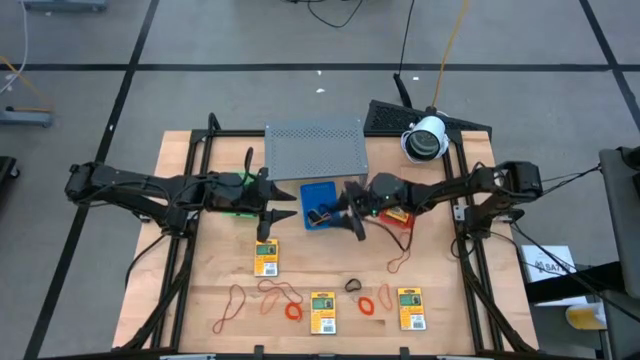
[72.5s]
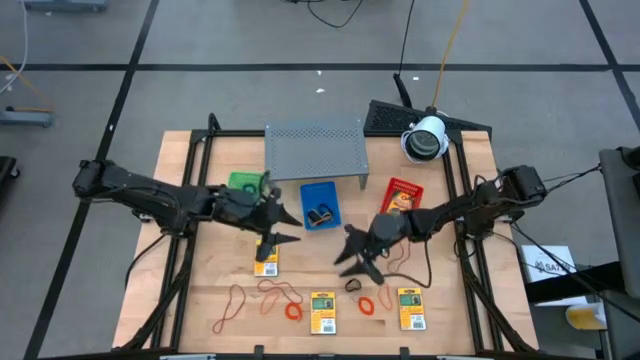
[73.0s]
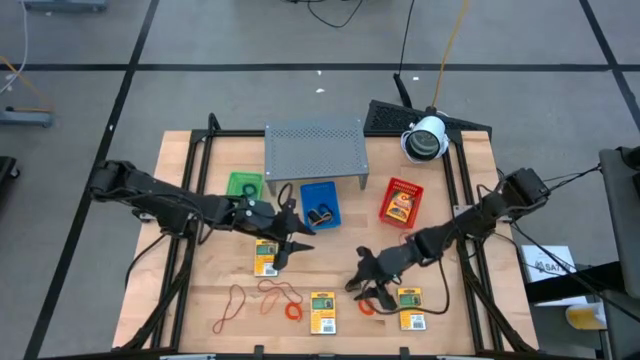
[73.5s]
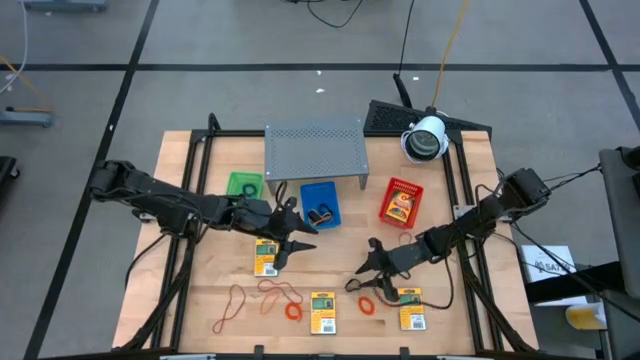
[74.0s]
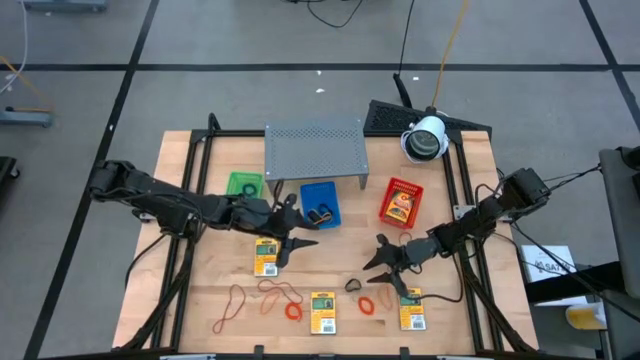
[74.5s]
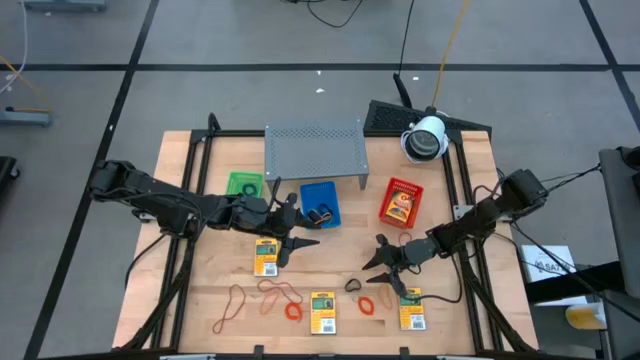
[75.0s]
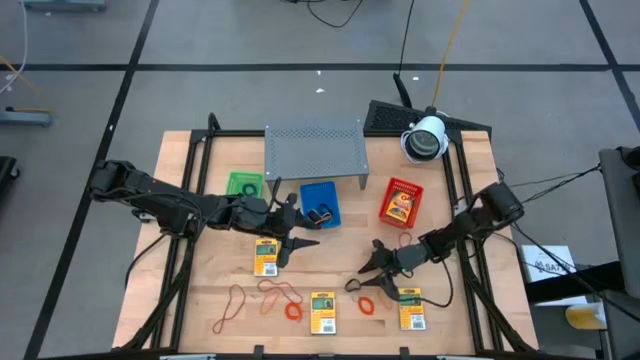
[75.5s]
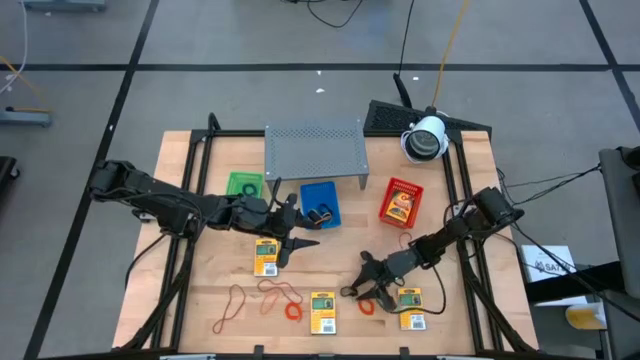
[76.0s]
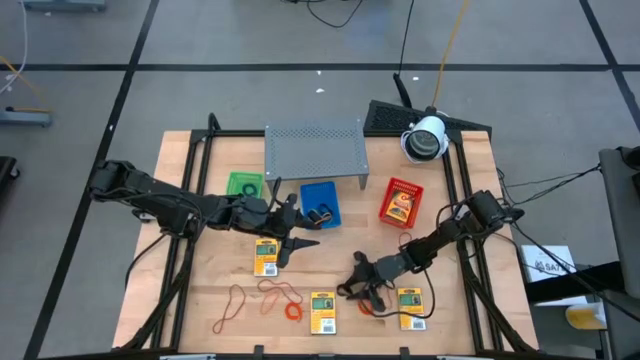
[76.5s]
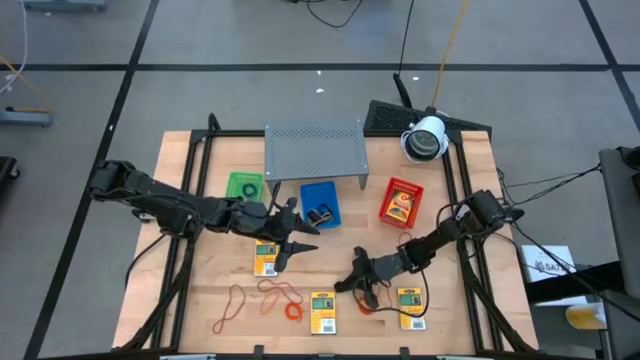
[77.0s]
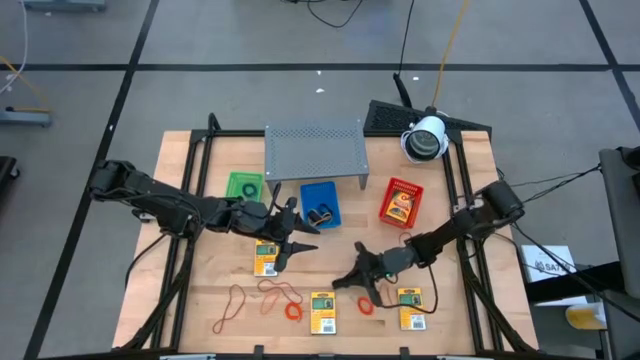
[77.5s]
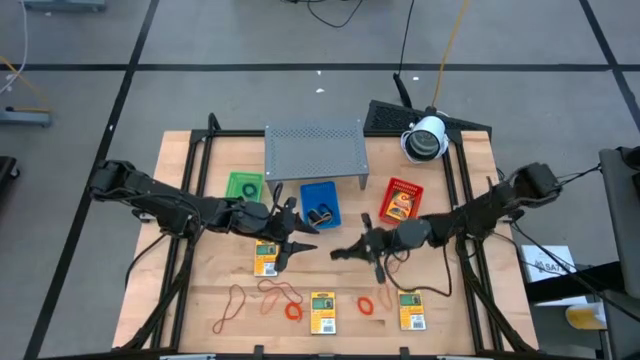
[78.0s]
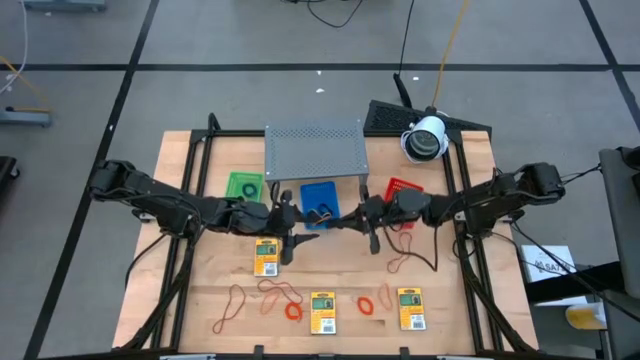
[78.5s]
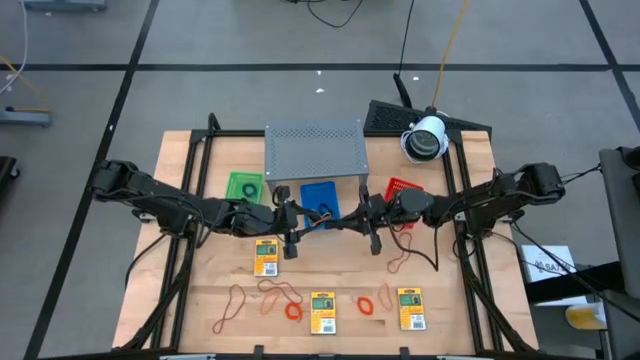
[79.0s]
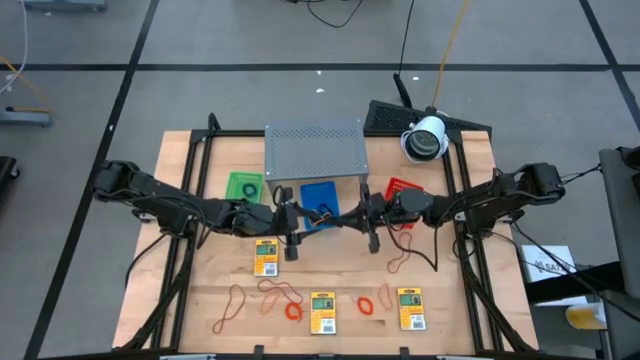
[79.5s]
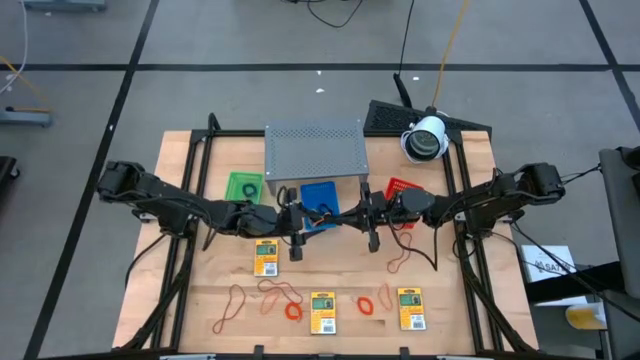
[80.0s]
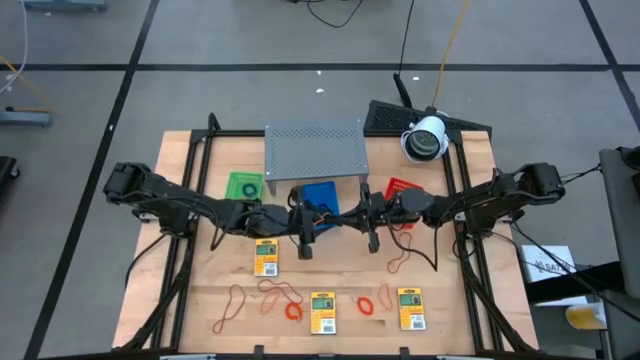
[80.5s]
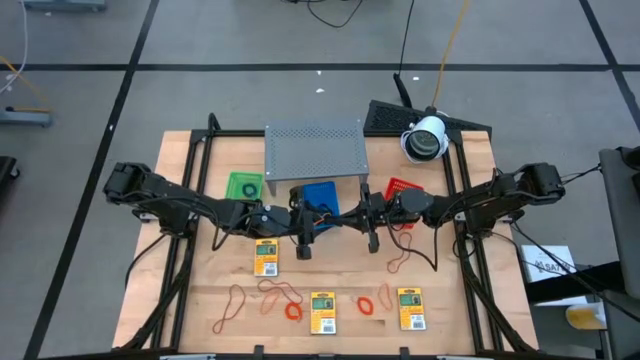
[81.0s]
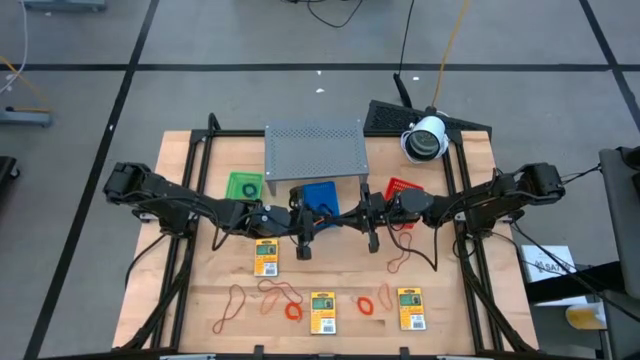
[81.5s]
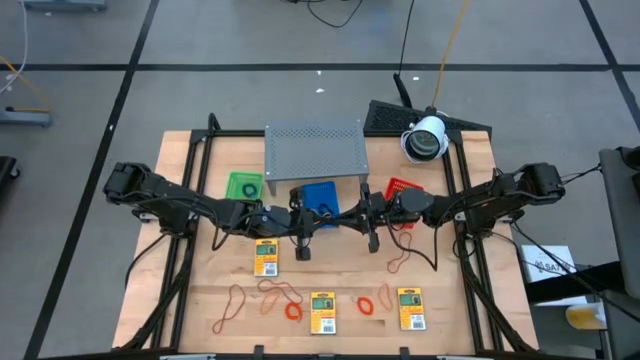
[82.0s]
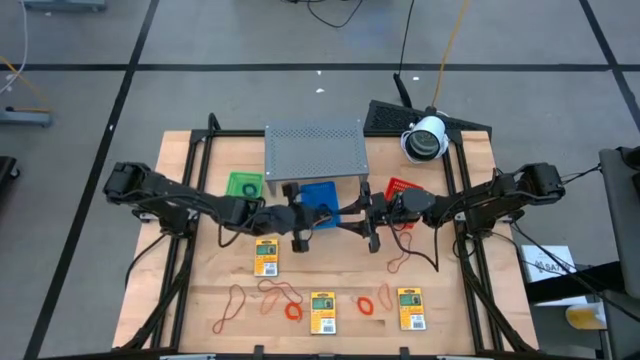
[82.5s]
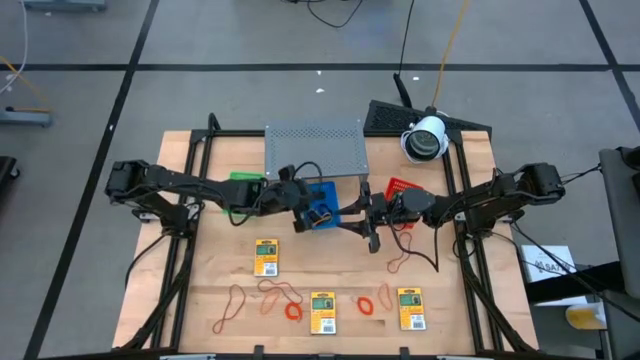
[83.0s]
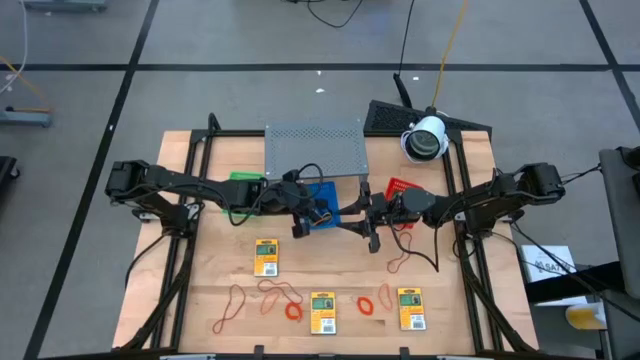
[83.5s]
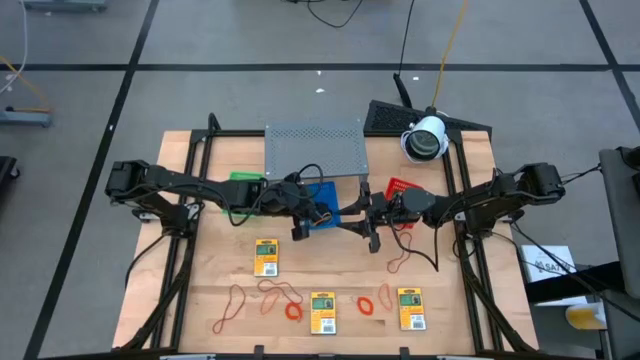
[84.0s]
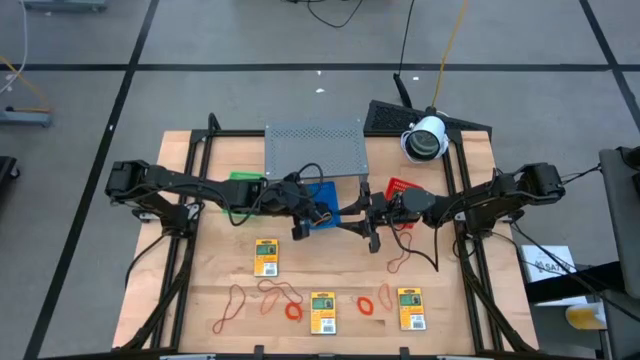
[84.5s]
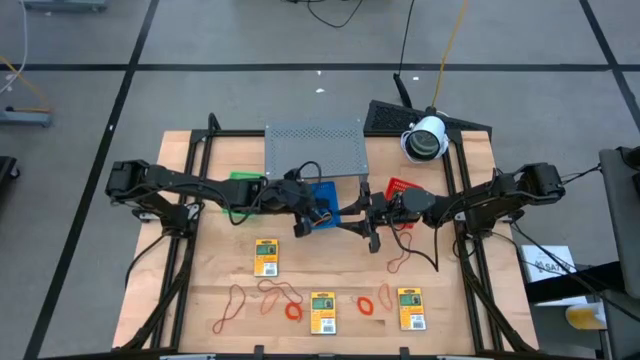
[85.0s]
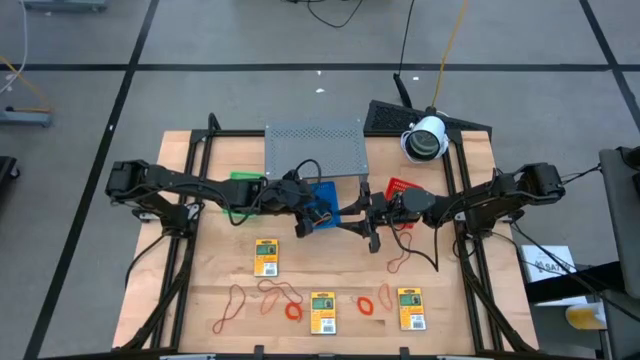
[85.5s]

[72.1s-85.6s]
Task: Pick & Place Office Desk Supplies
Put the black rubber band into the blue bin

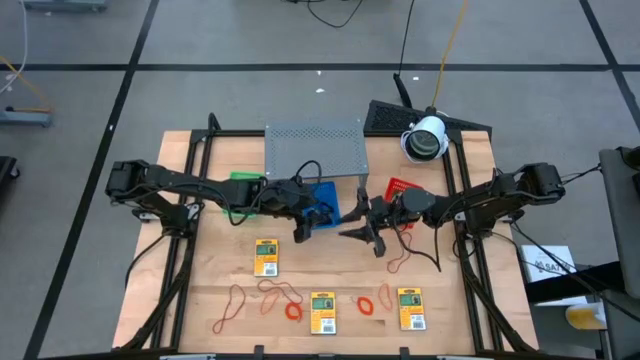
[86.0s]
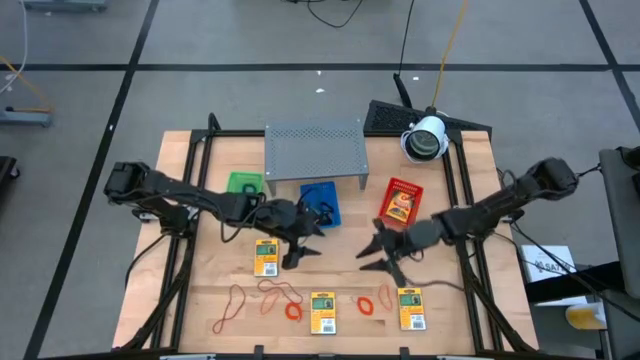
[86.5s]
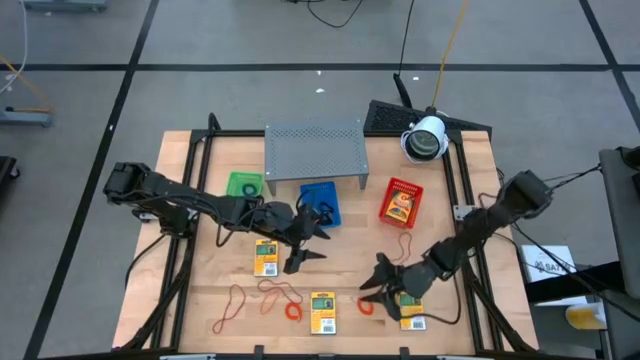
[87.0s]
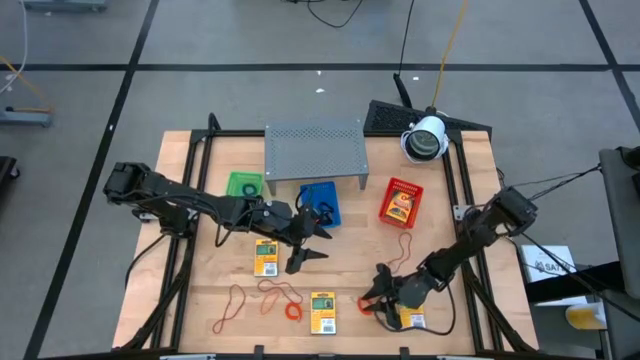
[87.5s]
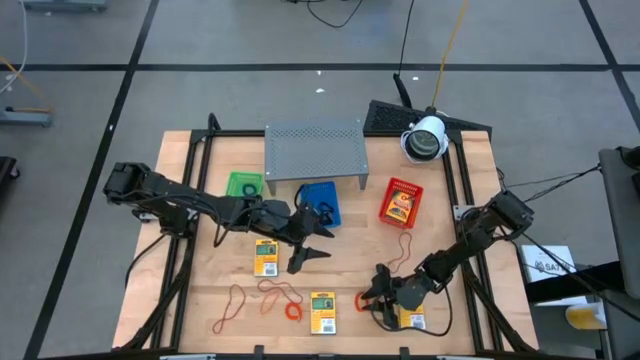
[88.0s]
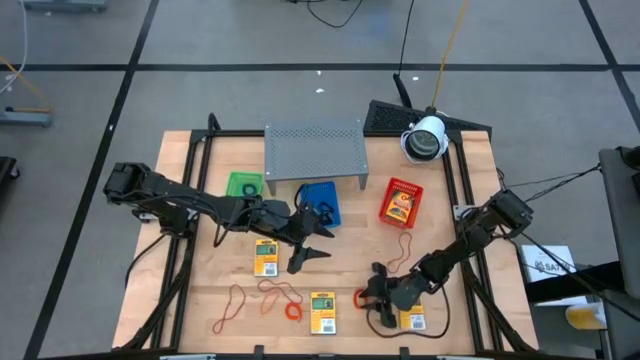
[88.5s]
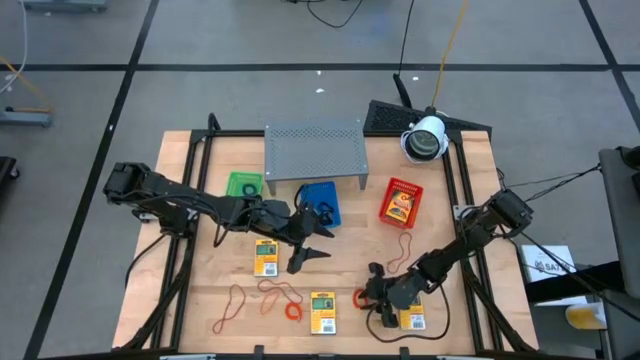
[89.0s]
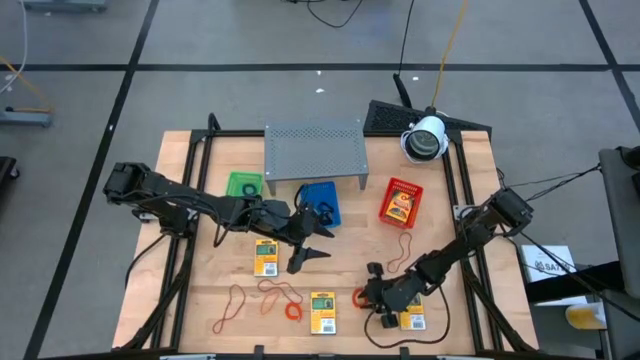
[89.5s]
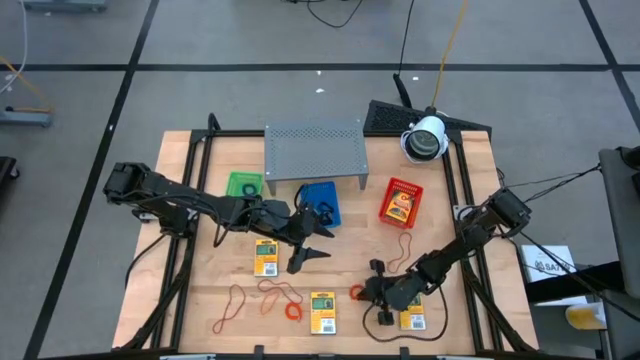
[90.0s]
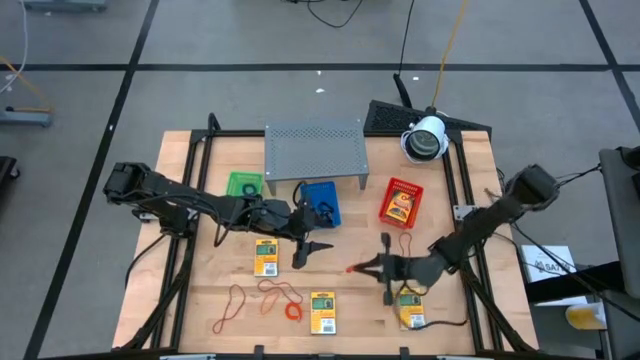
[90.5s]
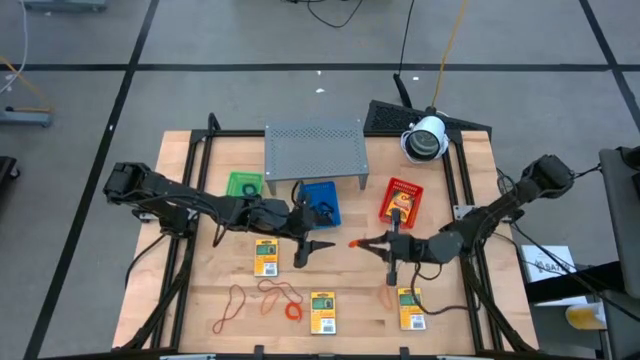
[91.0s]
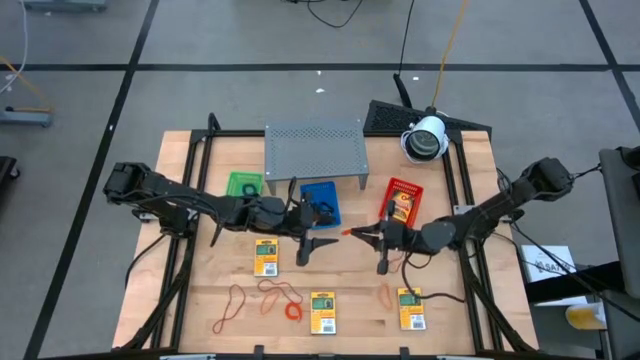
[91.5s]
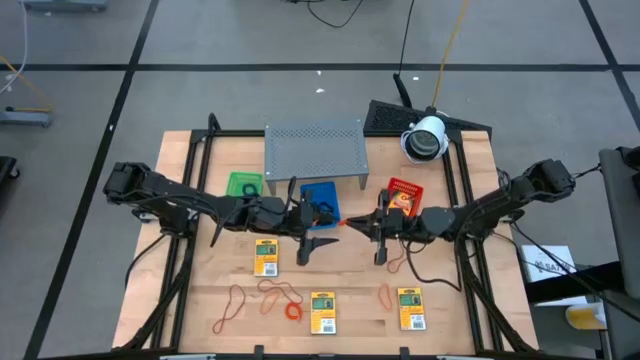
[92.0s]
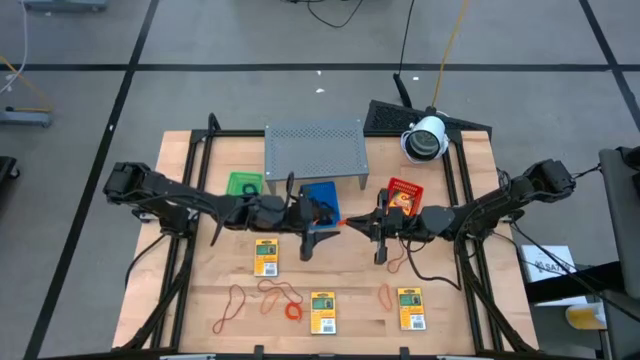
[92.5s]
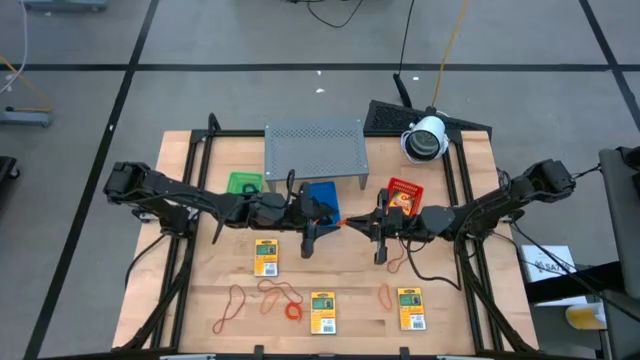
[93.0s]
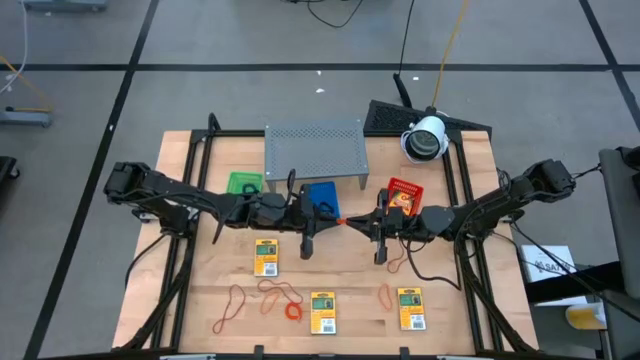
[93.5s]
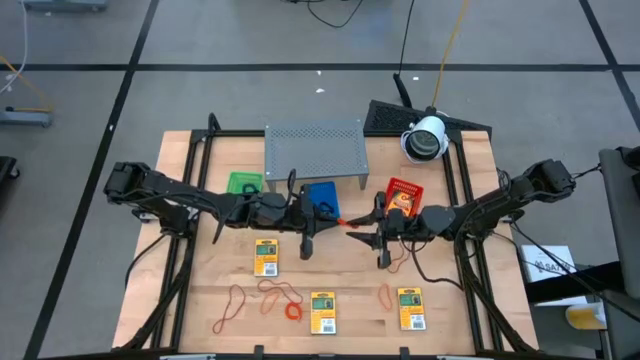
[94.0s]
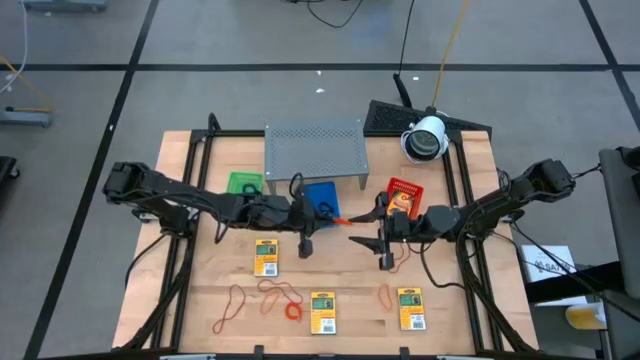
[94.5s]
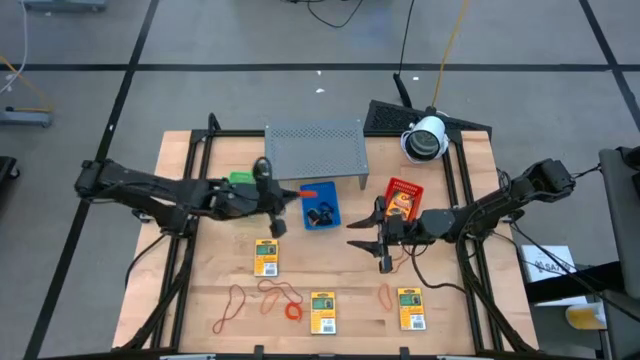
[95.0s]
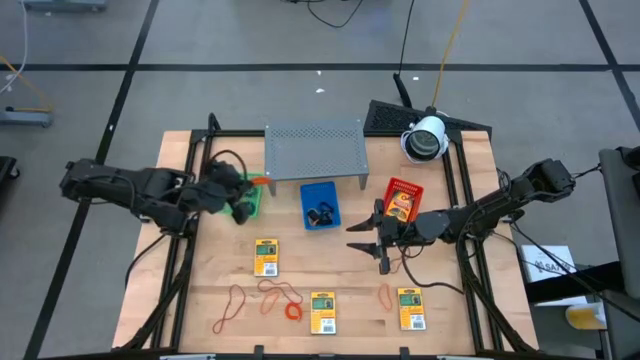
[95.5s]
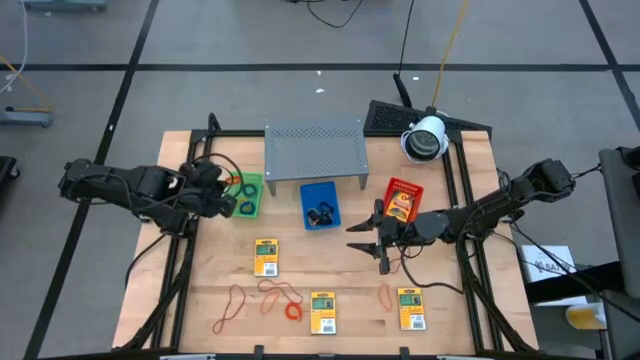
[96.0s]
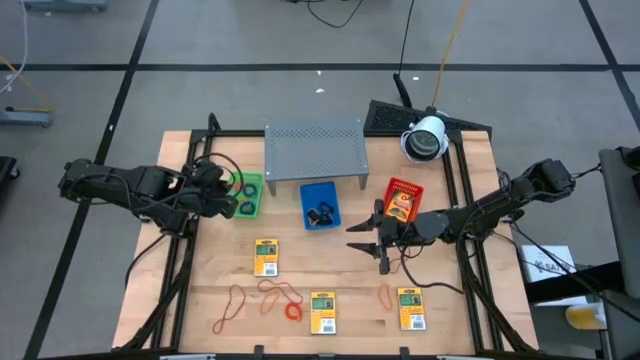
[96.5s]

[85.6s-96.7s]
Put the orange spring keychain into the green bin
